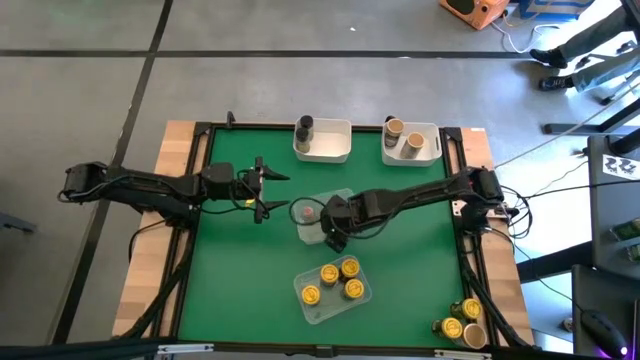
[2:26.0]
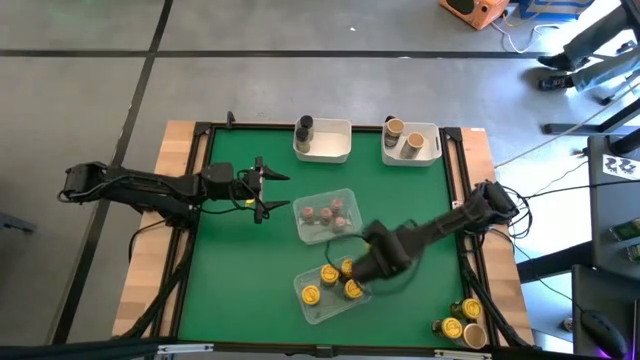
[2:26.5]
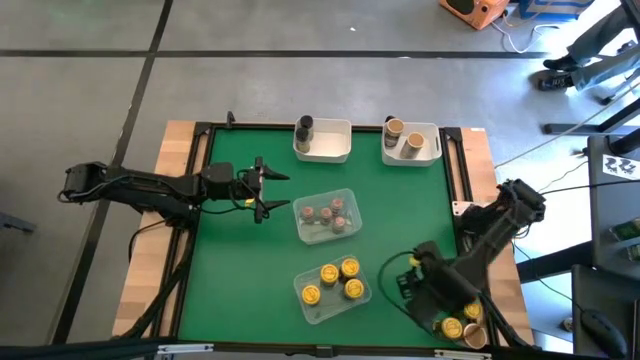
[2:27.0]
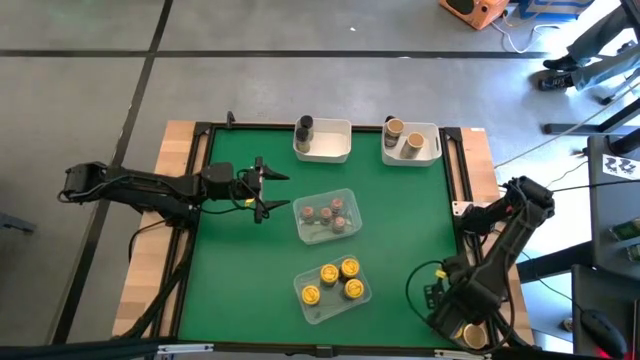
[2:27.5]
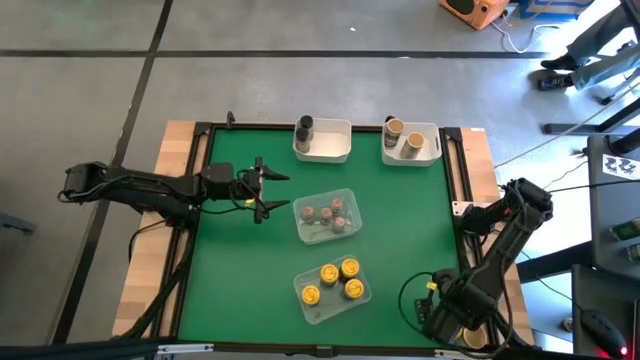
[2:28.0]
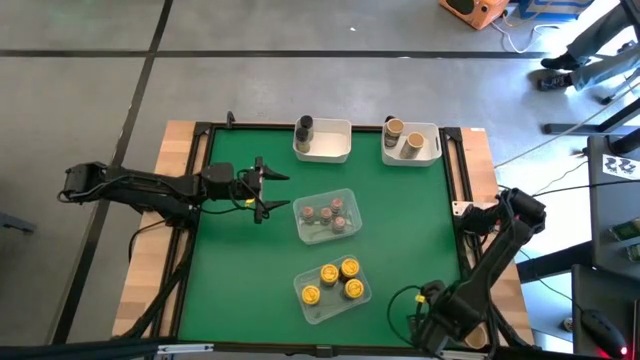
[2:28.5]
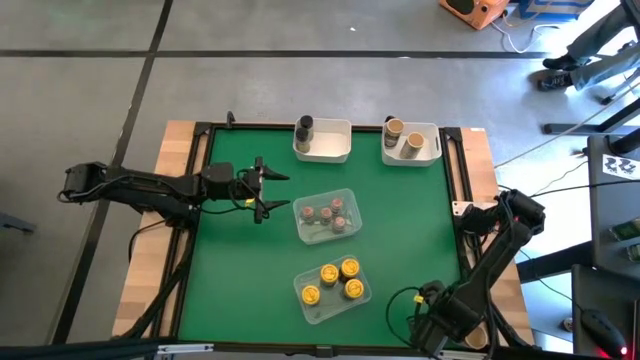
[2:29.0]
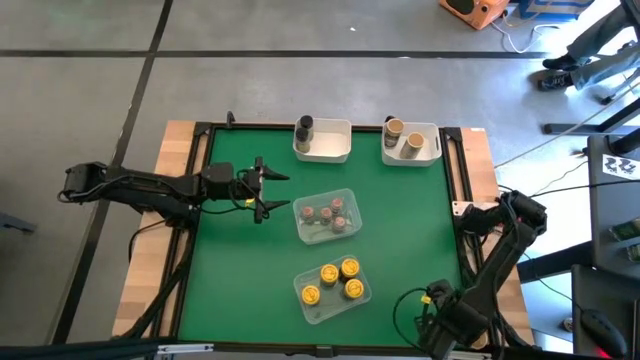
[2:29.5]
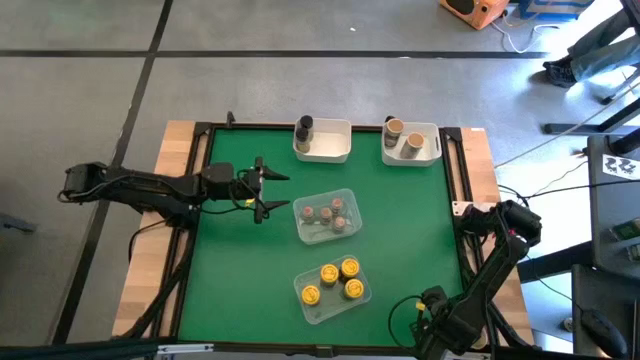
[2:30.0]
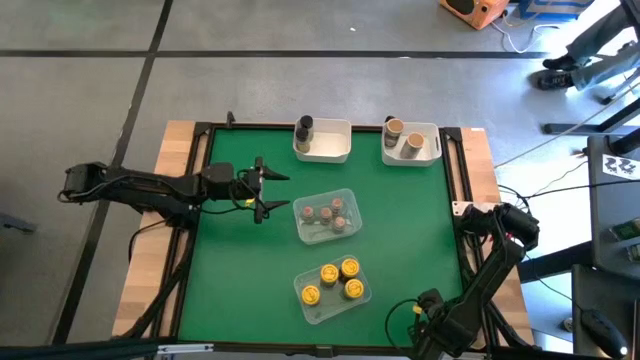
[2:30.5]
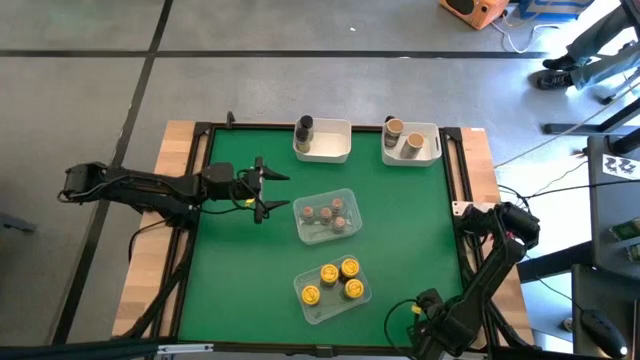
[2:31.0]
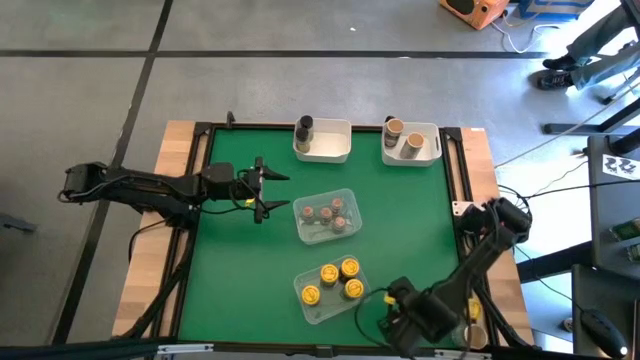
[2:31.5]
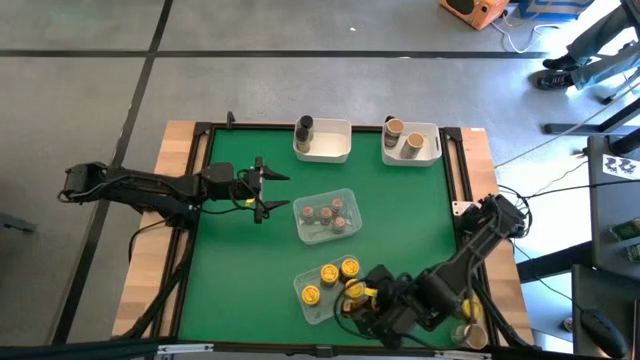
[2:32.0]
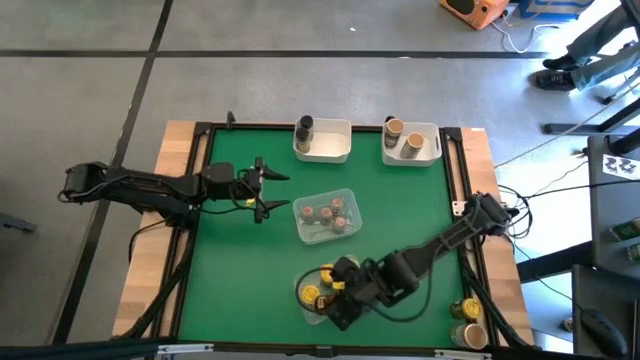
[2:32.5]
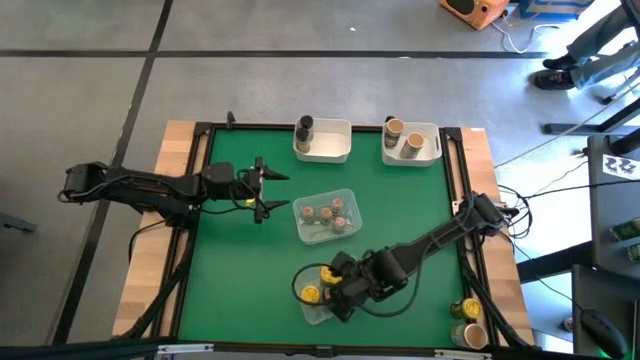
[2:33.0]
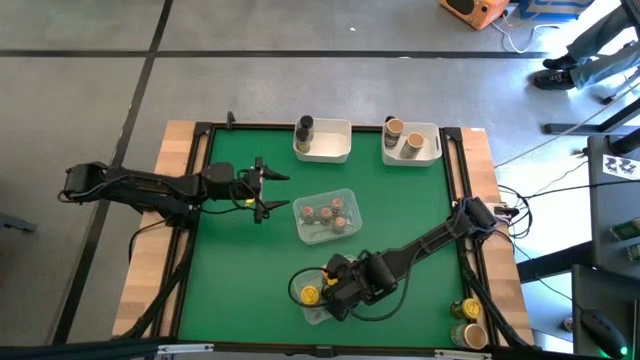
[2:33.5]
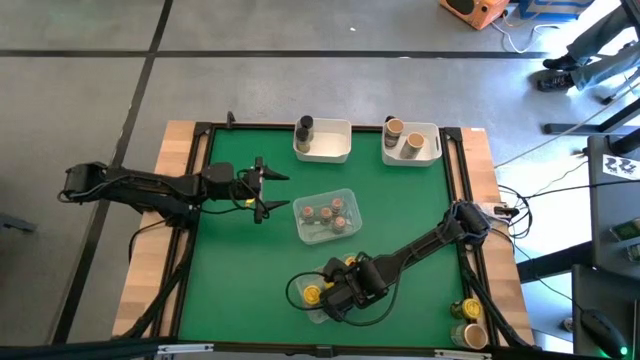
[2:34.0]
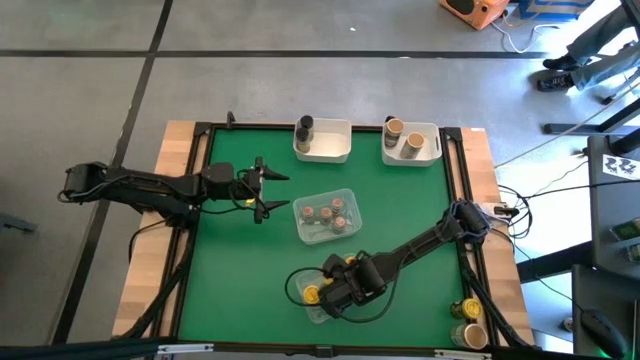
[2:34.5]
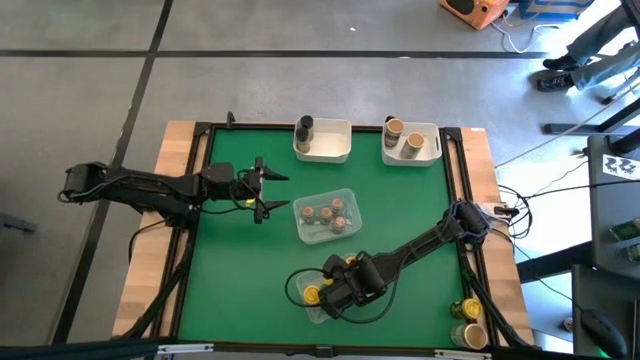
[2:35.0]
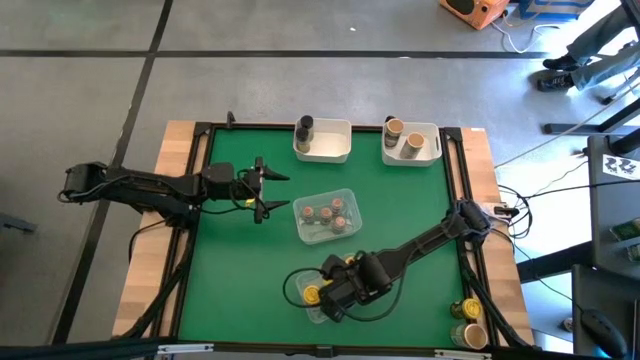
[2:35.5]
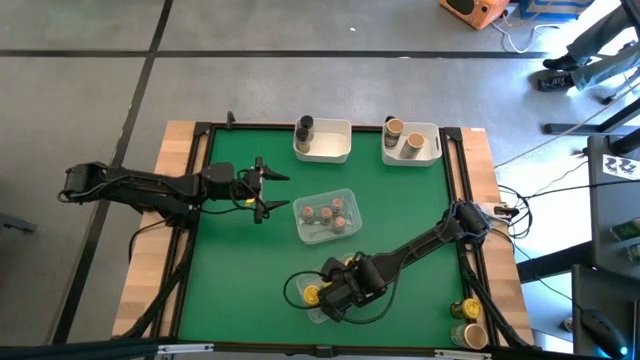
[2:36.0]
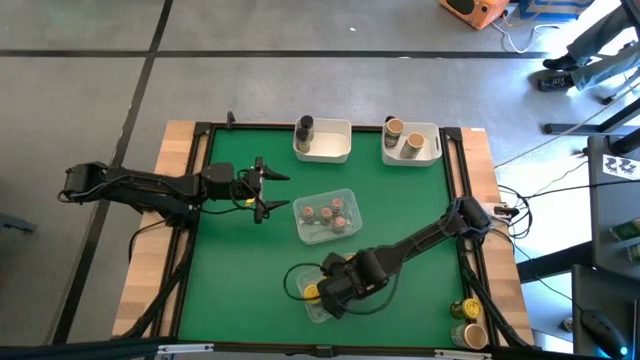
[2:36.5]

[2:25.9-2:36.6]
Task: Sort spices by type
Put the bottom yellow seasoning bottle into the bottom transparent bin

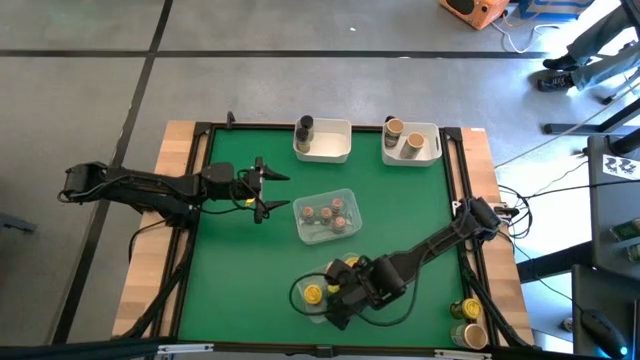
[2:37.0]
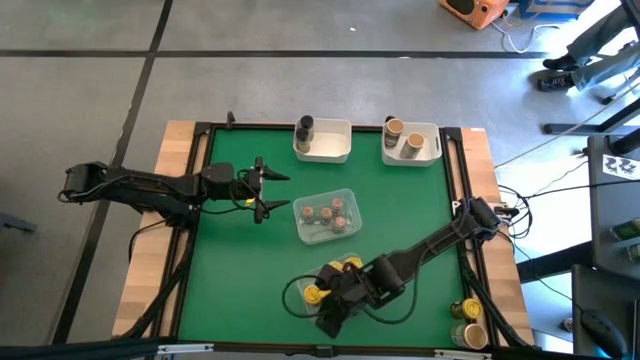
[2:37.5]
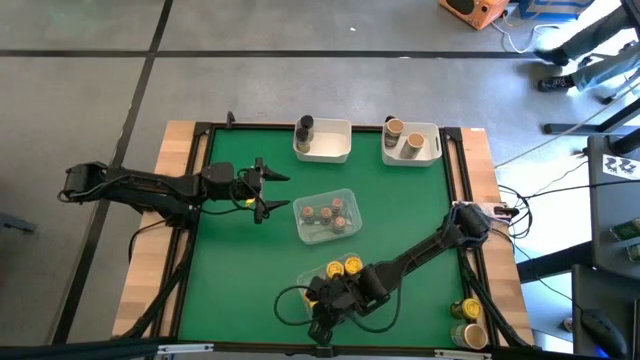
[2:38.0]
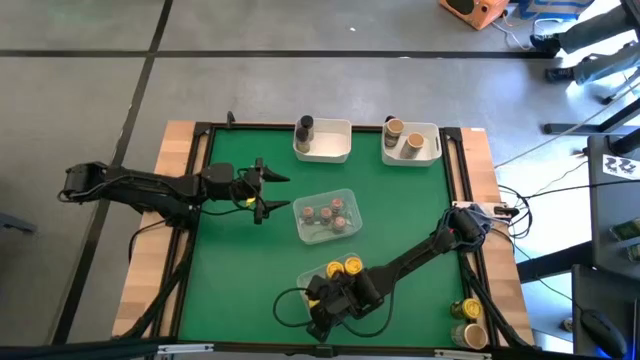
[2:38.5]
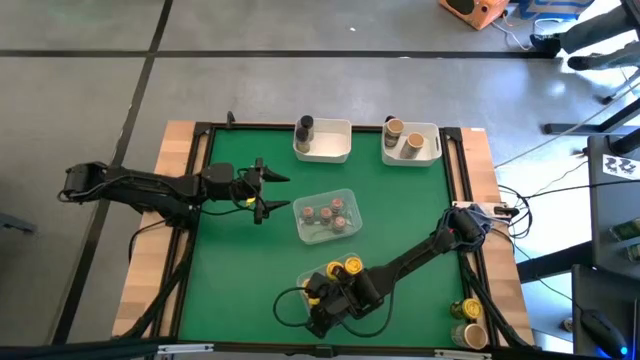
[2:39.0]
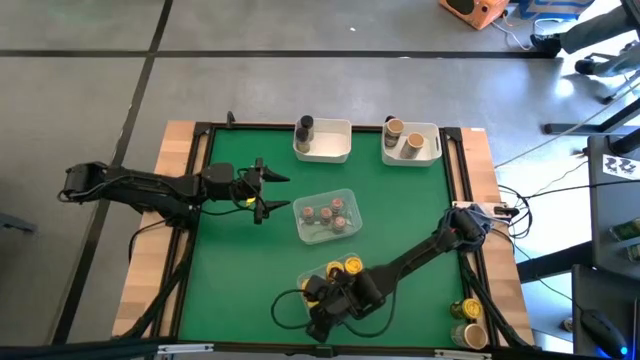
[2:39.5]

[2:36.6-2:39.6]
Adjust the yellow seasoning bottle

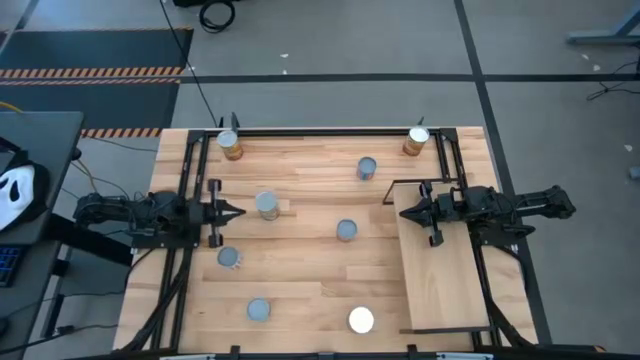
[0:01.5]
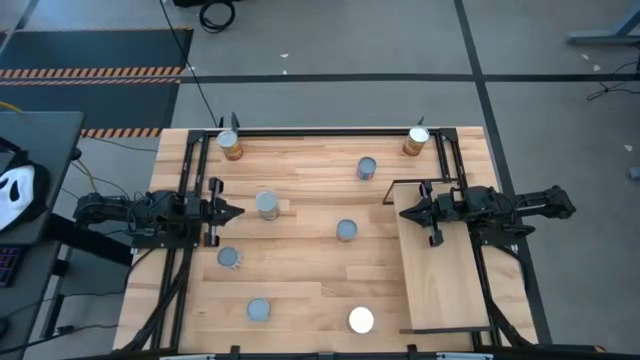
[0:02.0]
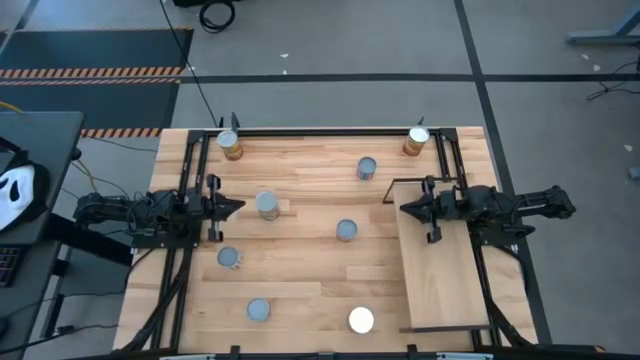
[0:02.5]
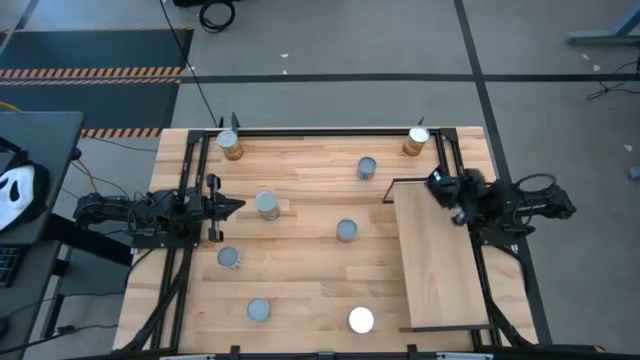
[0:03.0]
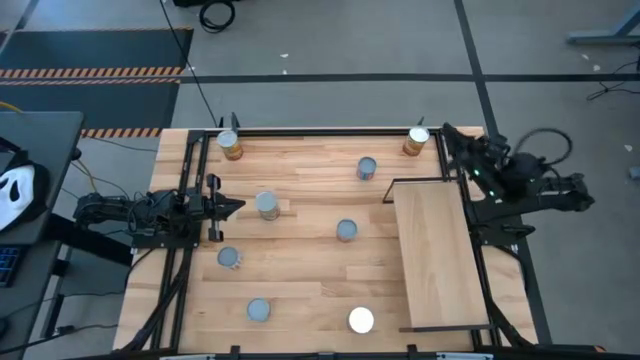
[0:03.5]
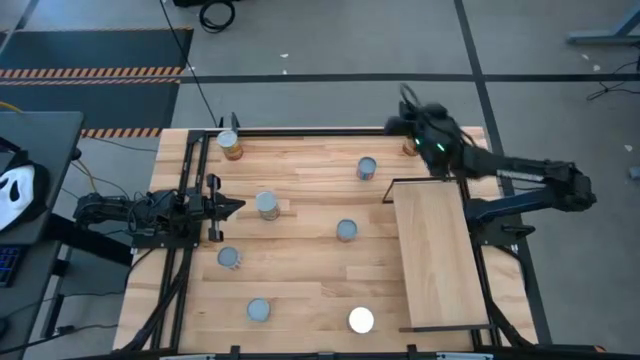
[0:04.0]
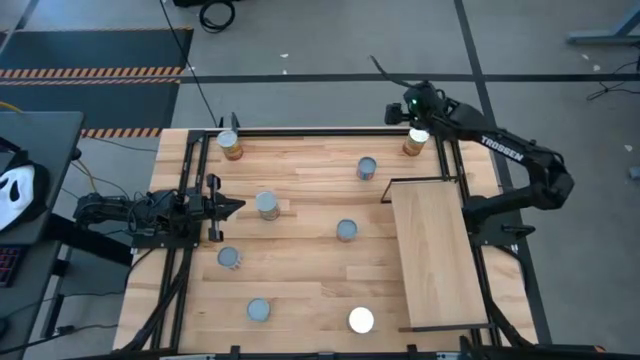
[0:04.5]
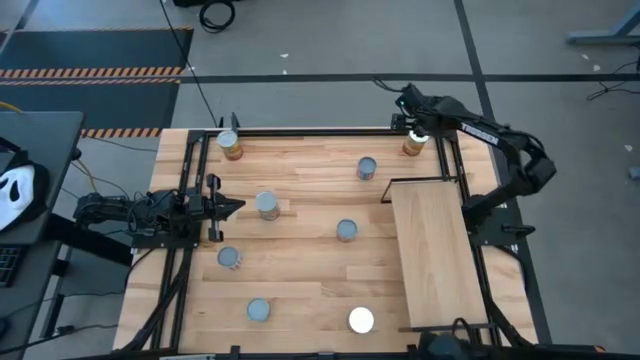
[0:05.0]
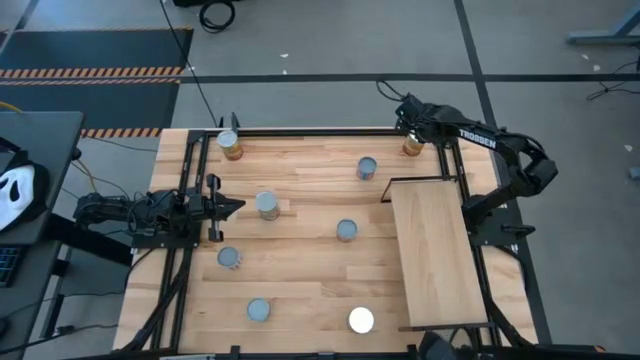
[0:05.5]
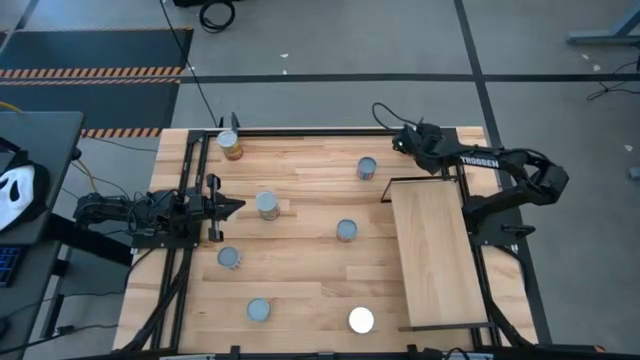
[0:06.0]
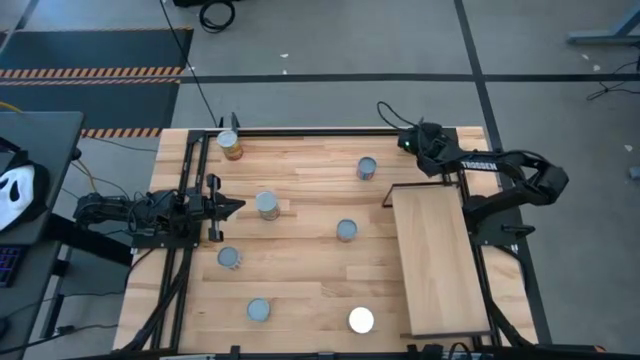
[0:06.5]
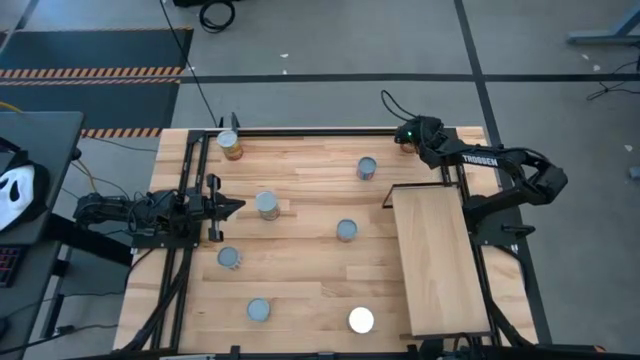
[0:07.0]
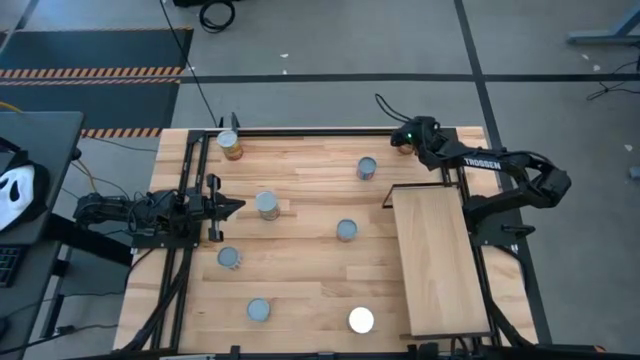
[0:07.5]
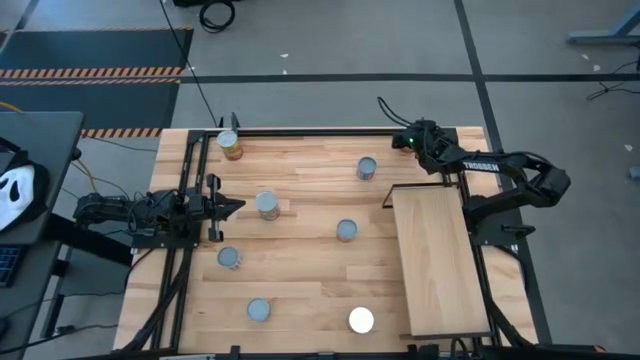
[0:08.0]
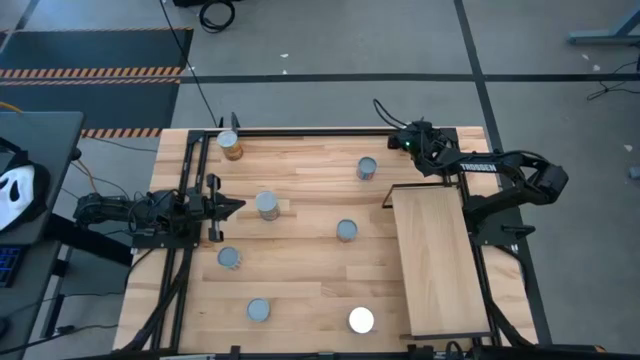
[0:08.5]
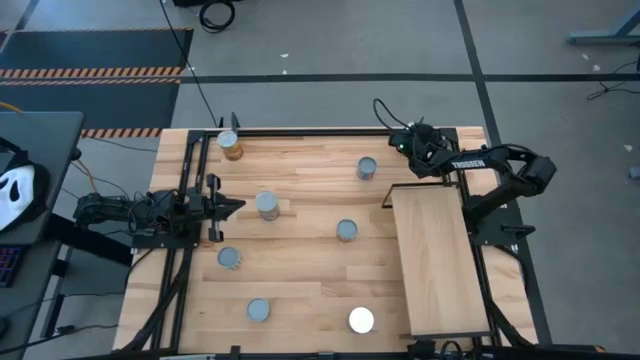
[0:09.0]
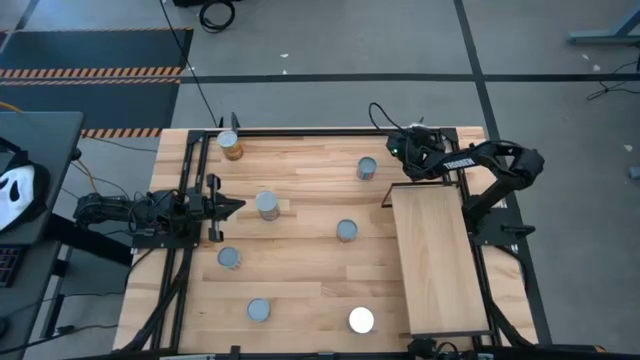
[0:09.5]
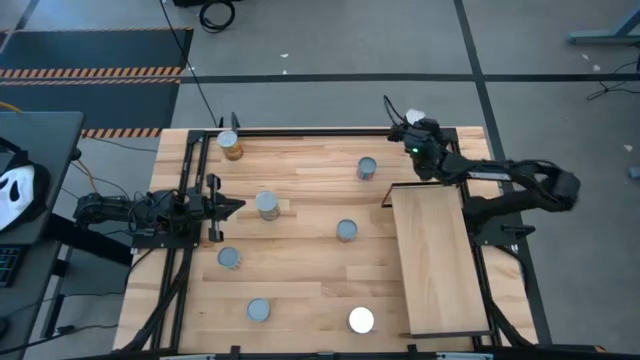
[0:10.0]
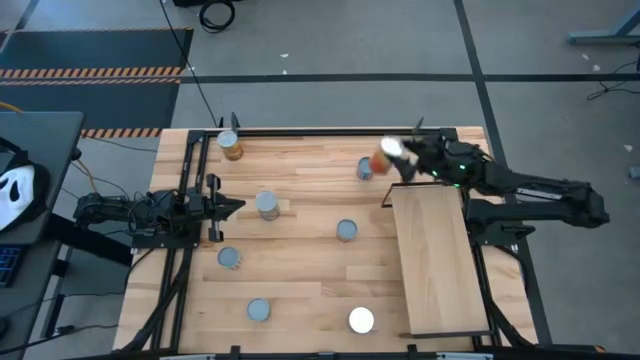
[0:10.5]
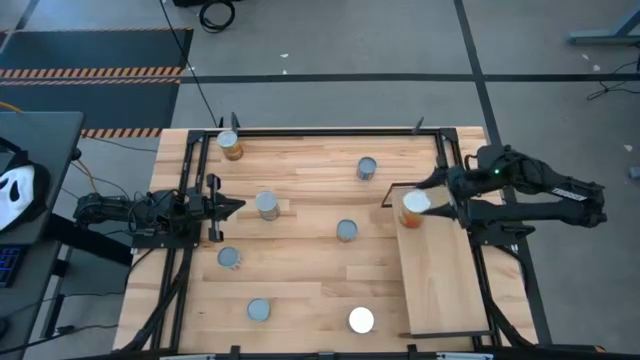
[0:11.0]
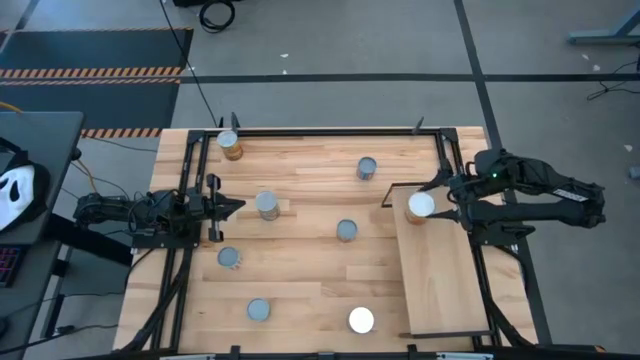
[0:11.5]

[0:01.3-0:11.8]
Task: Pick and place cans onto a shelf
Put the large right canned corn on the shelf
